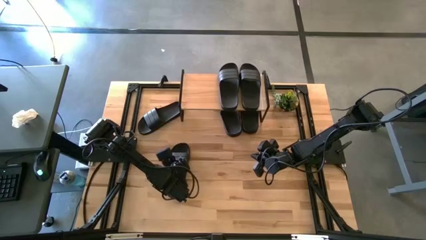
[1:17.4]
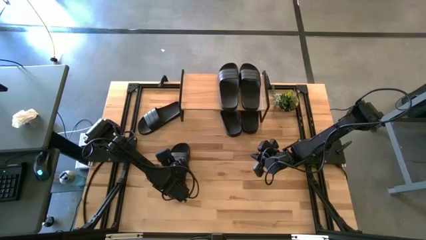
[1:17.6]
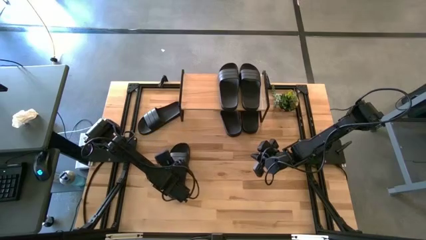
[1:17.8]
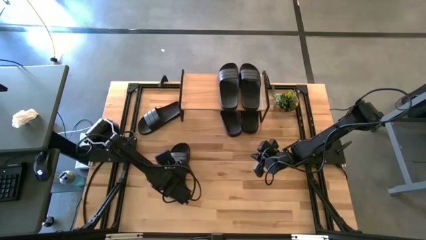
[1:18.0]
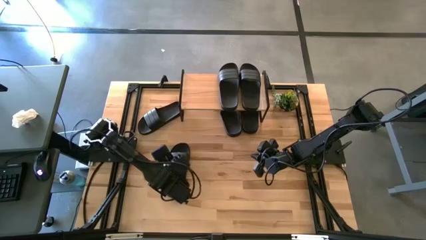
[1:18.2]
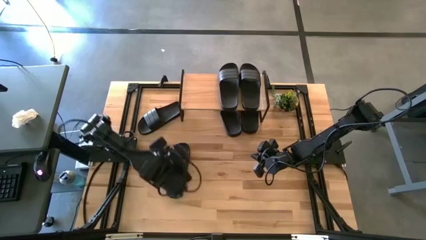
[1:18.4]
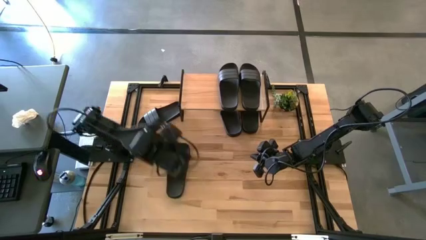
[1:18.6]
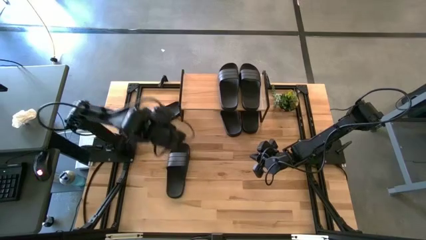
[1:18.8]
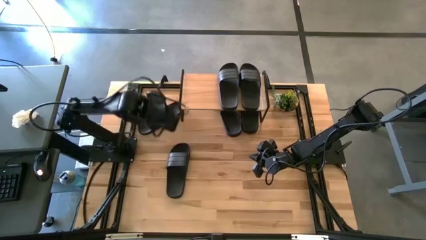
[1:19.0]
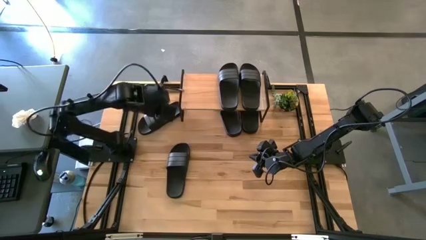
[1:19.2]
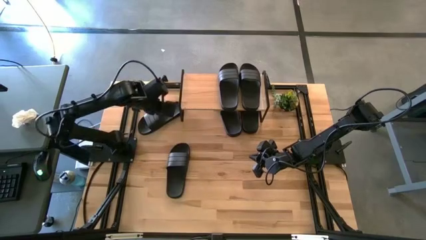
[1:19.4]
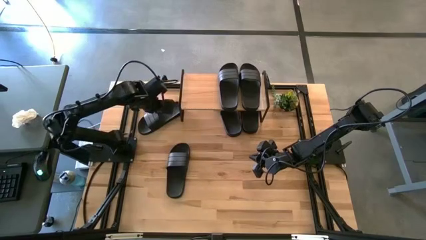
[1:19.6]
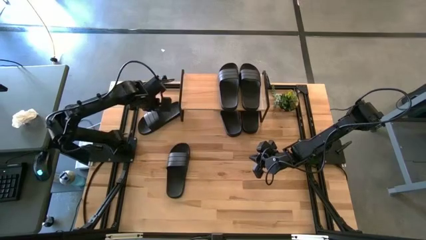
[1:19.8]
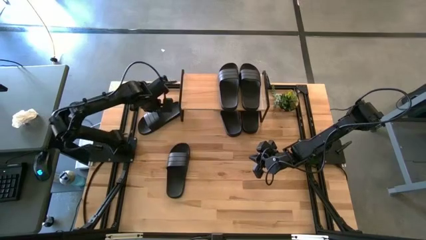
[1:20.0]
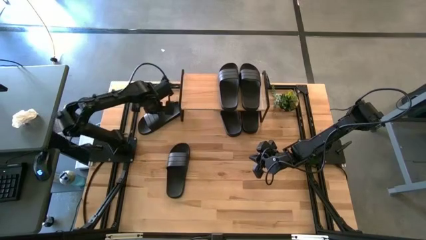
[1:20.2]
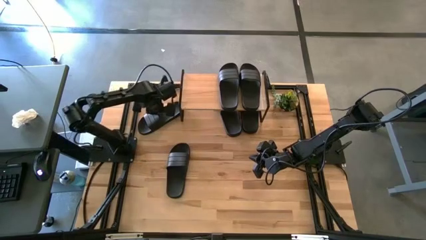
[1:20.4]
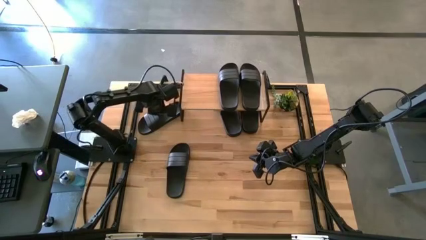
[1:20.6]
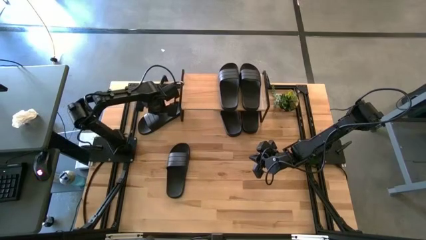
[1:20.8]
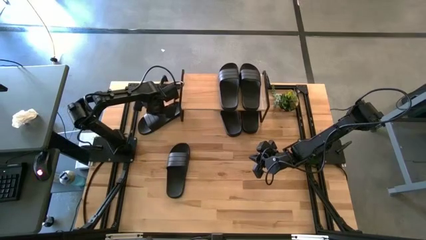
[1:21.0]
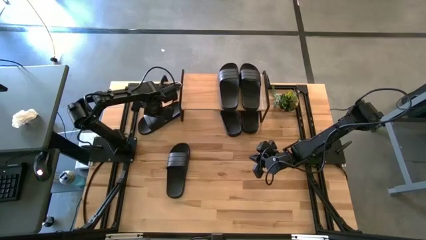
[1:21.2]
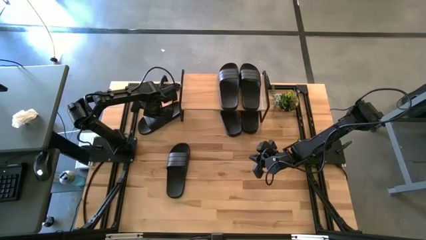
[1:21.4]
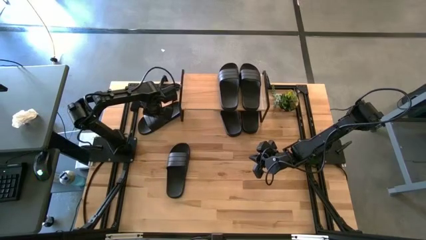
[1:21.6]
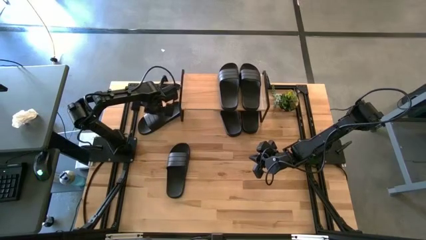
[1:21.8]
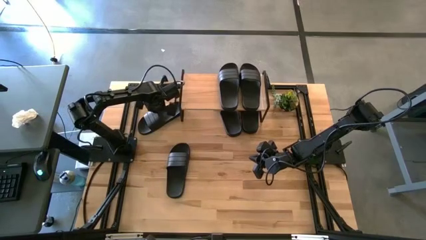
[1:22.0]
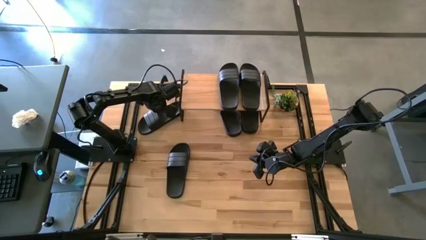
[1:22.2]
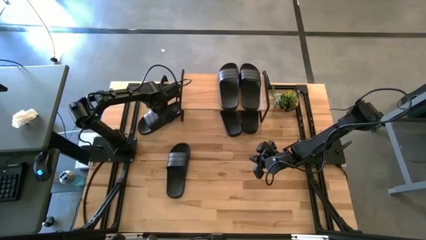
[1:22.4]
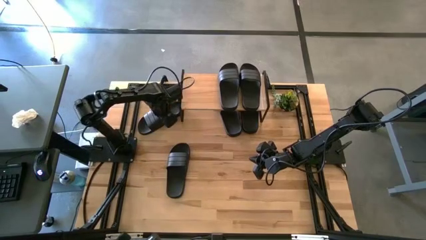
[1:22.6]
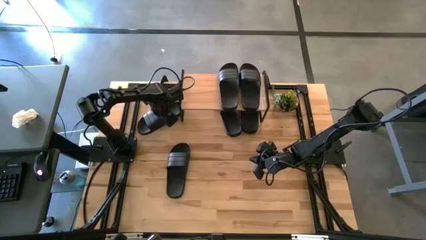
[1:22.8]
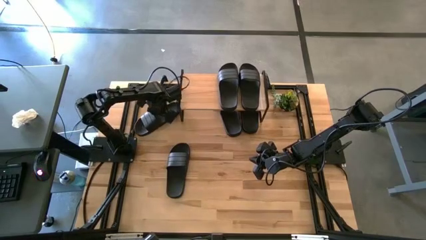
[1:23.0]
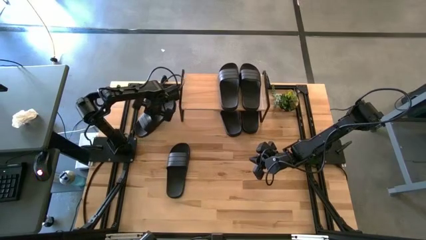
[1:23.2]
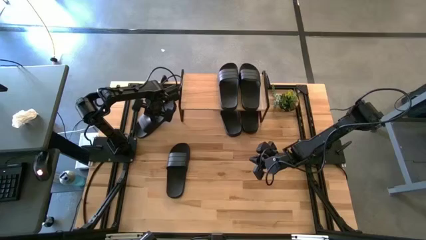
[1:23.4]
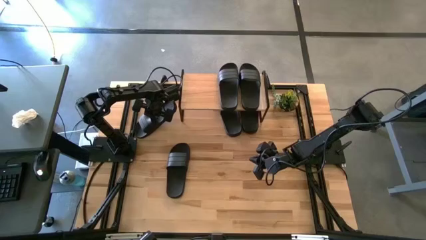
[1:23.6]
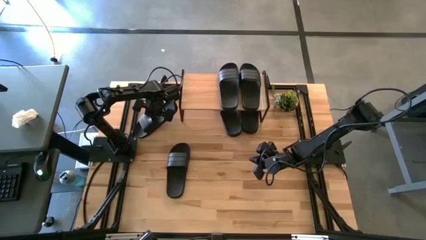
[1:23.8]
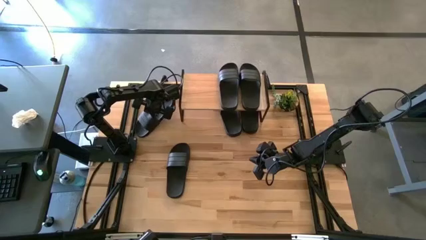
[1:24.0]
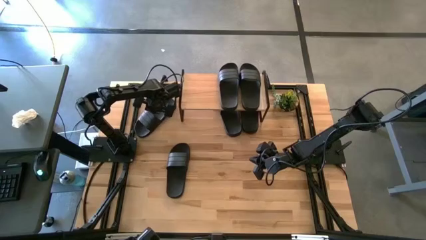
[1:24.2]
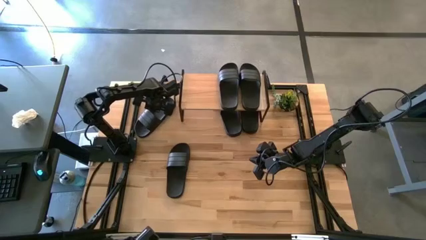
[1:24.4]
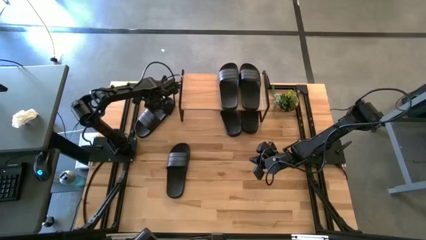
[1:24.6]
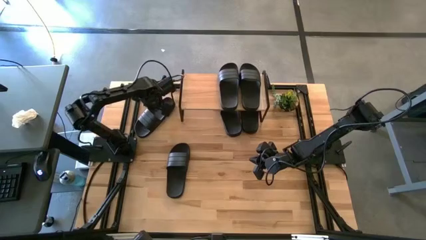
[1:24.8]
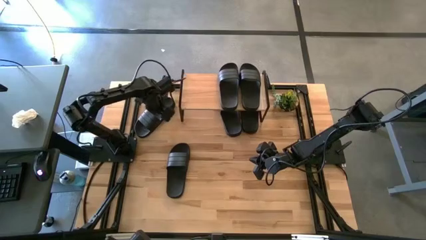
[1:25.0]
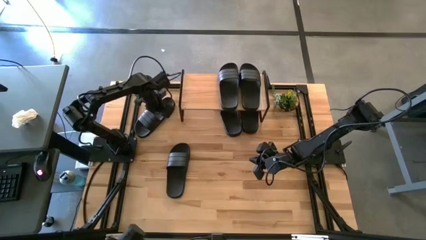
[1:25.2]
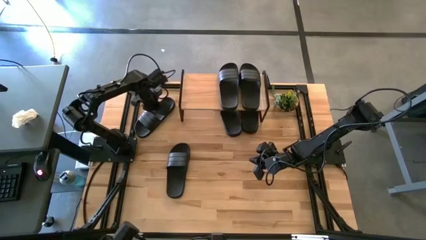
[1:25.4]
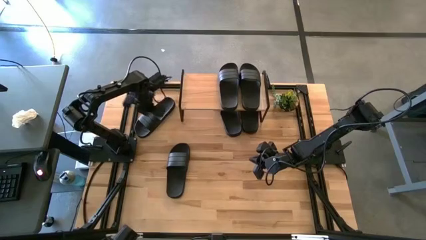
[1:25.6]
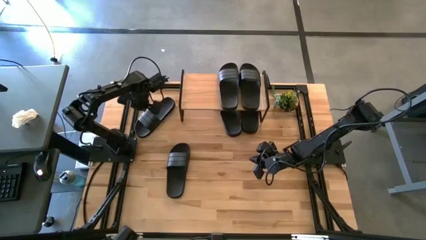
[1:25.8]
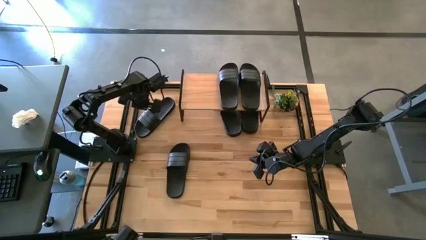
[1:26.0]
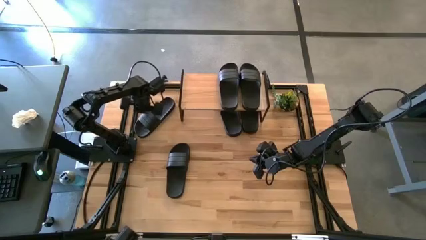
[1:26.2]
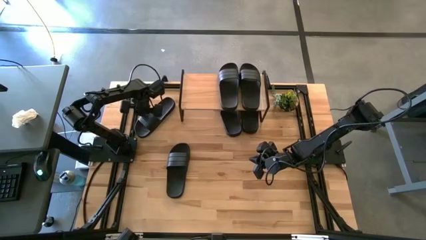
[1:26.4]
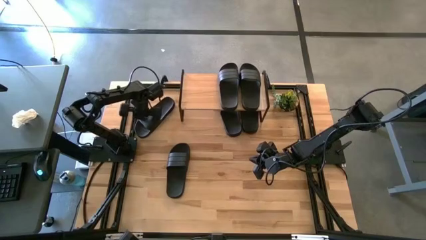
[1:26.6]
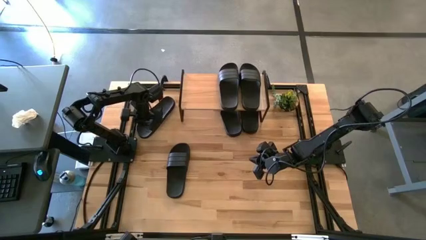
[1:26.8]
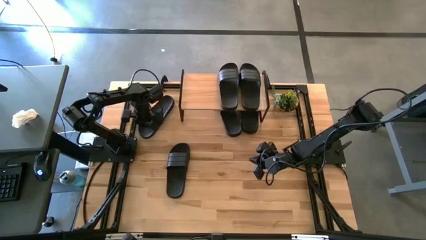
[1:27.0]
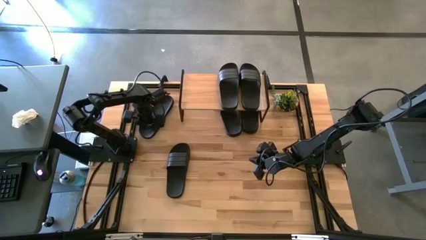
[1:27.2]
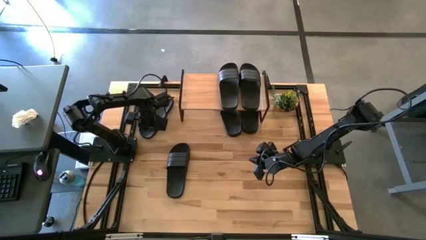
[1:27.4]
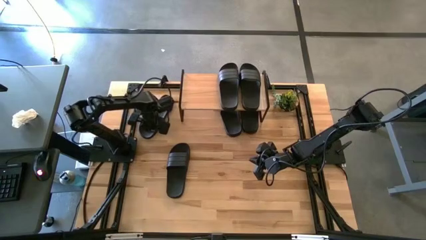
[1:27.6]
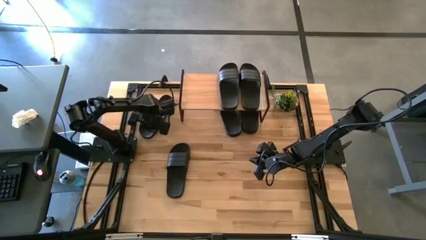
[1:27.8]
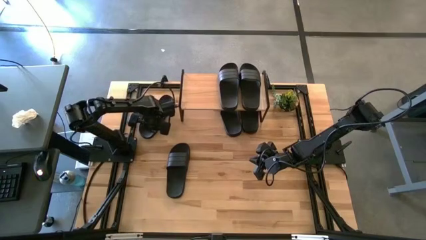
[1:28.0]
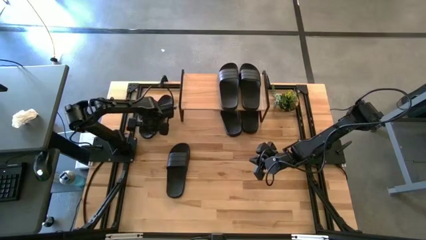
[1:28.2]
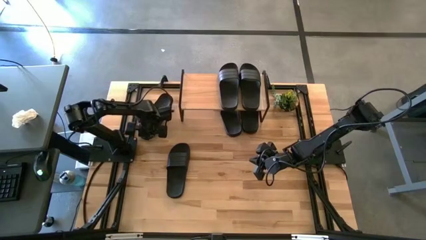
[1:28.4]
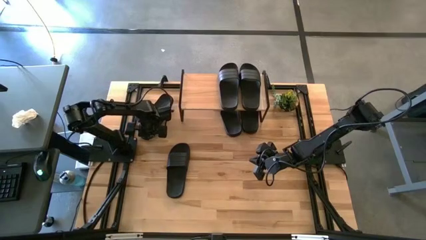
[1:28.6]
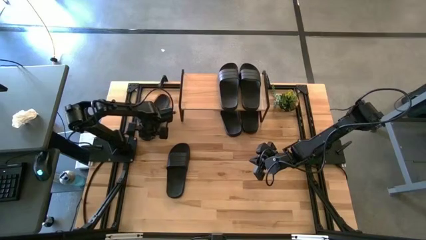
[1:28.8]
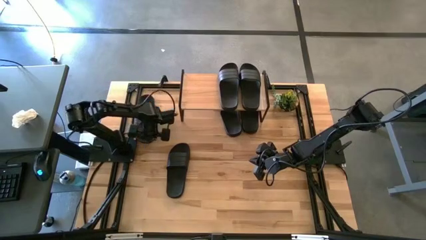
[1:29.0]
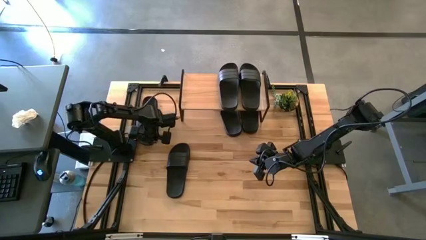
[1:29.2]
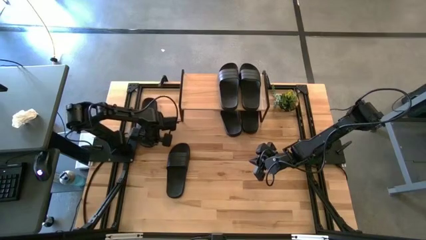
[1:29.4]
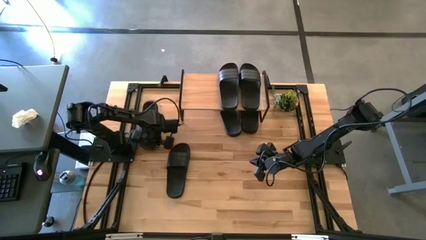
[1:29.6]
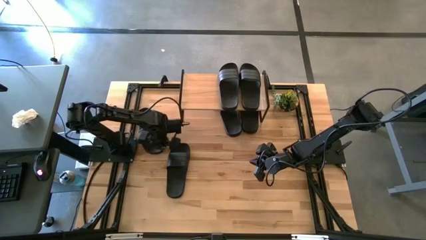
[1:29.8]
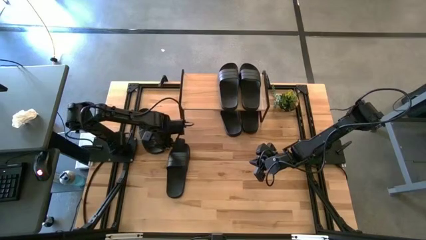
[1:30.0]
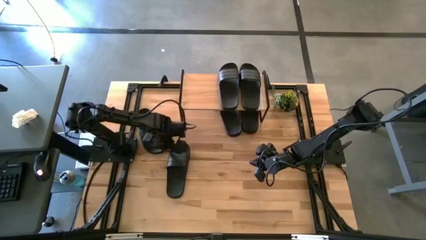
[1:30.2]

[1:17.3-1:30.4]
Task: Pick and place slides into the shelf
Move the black slipper to the middle of the table
